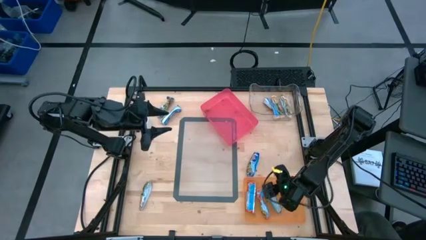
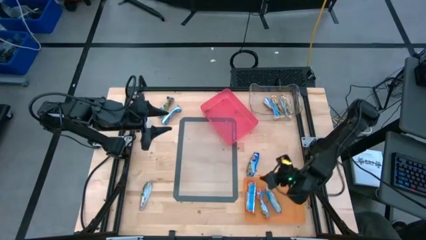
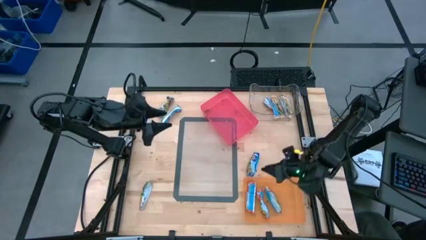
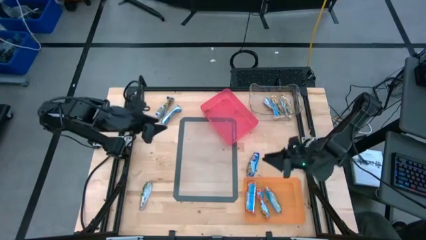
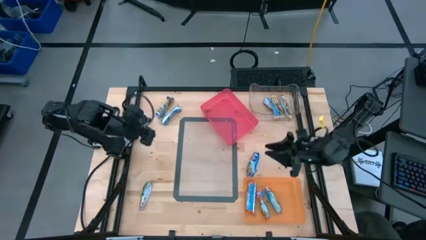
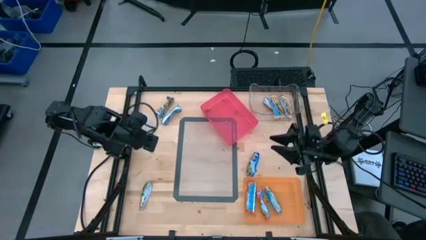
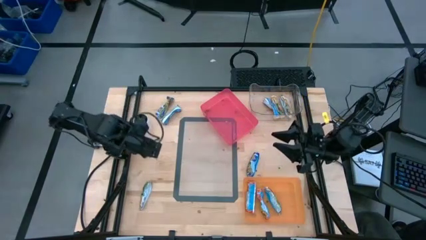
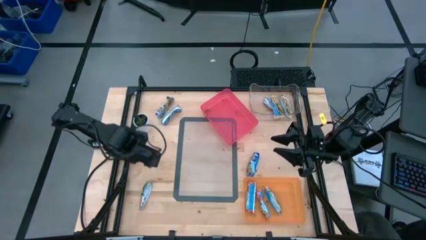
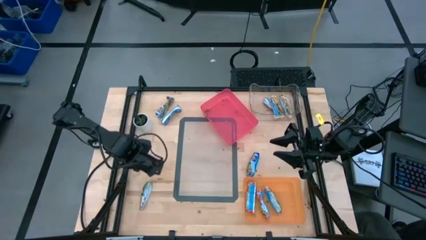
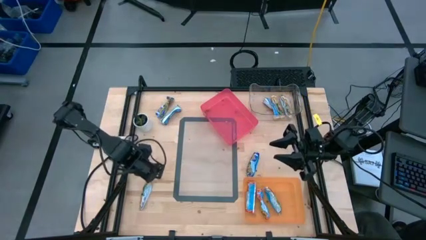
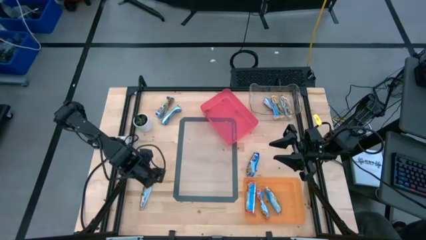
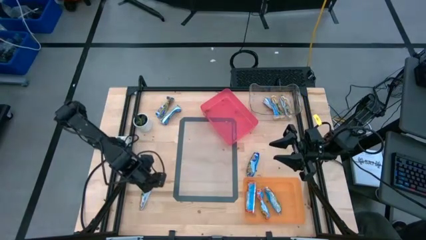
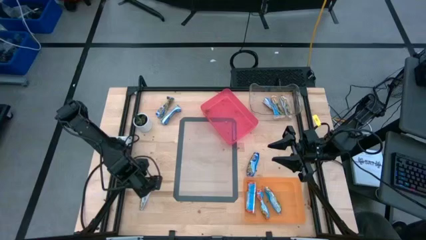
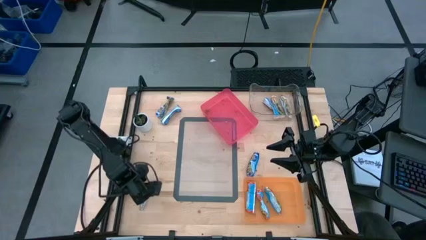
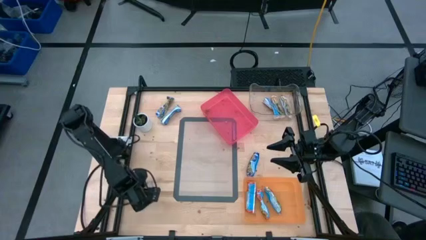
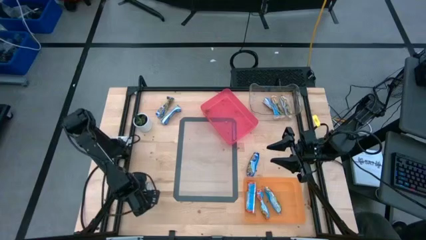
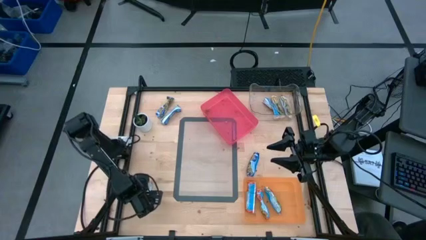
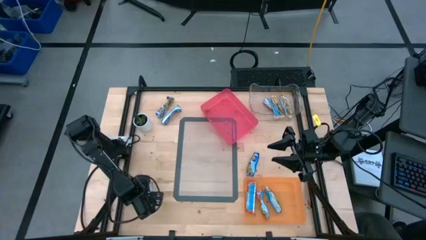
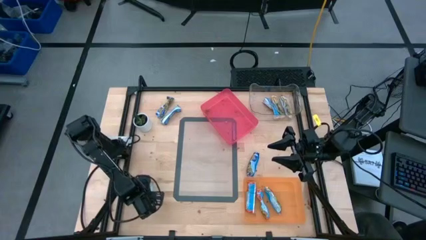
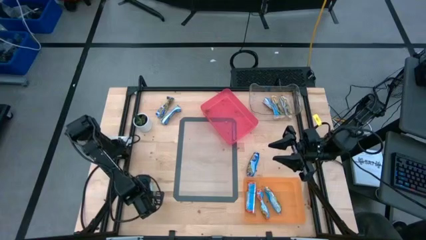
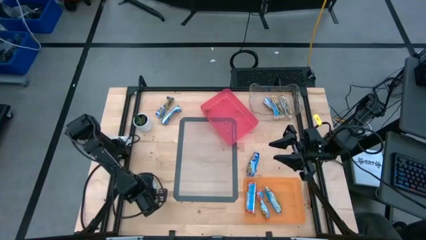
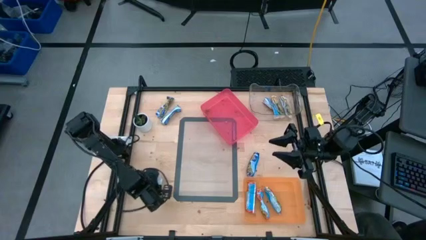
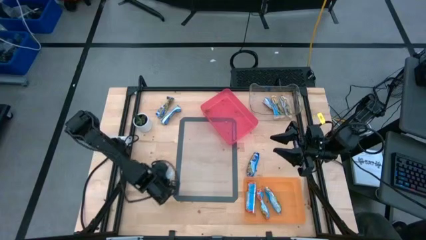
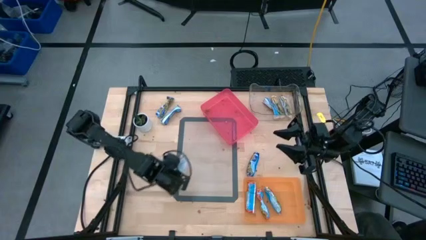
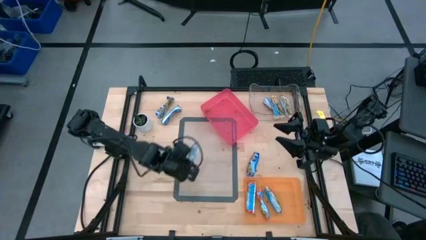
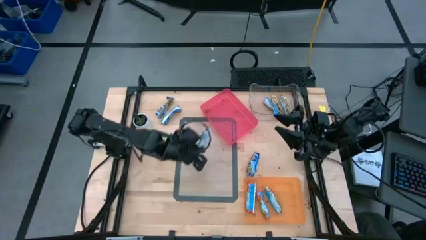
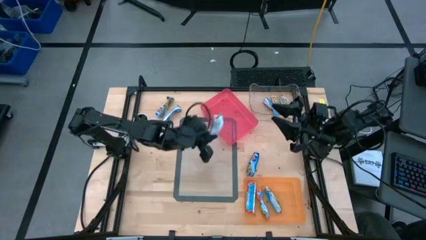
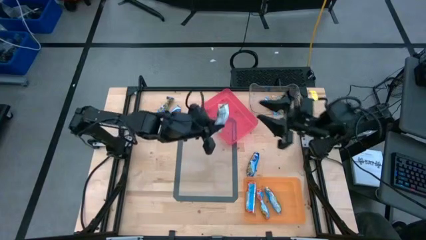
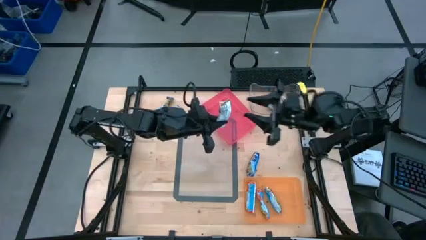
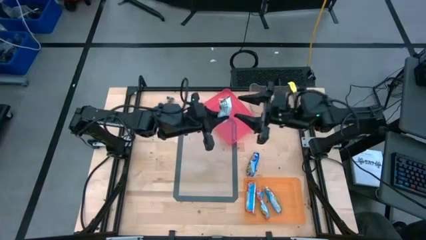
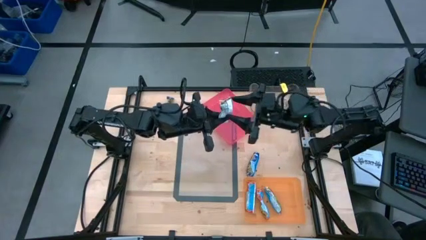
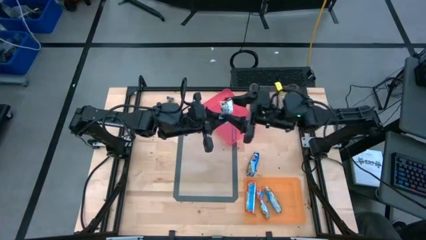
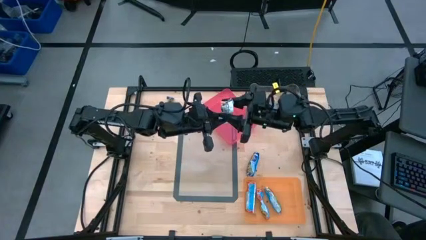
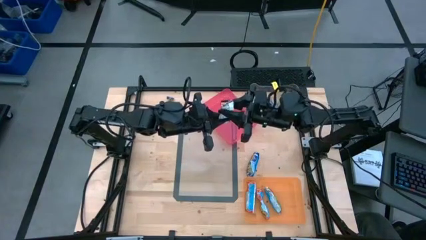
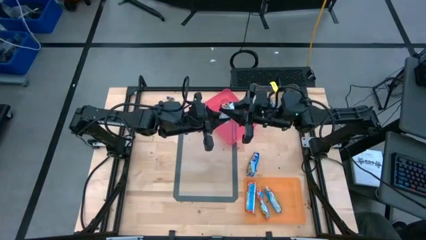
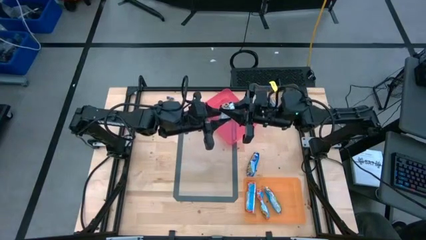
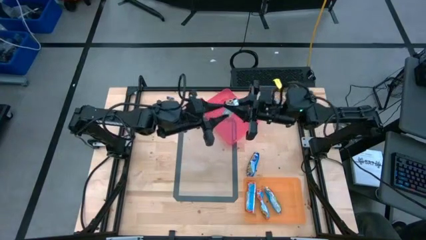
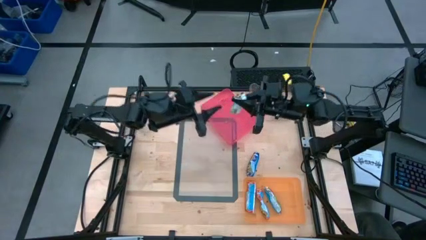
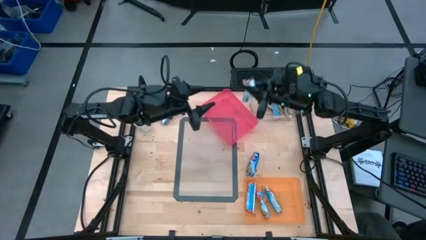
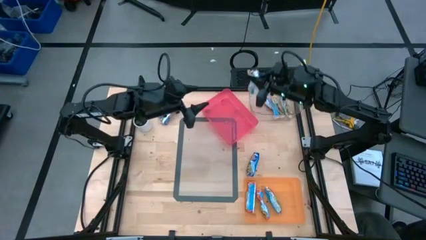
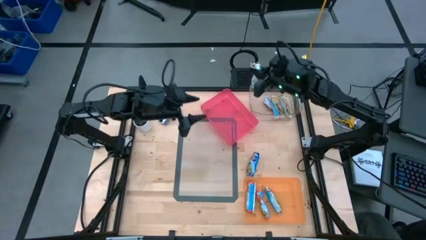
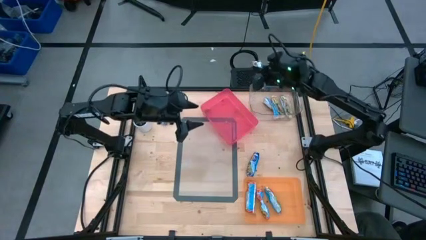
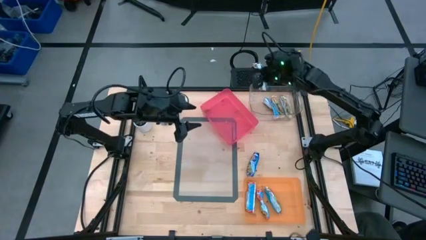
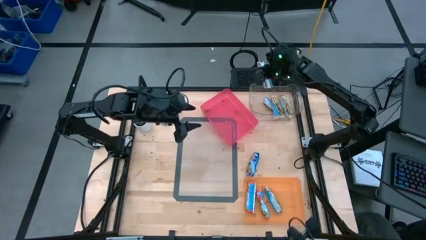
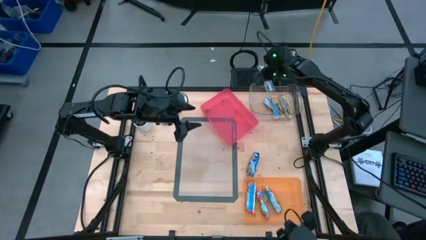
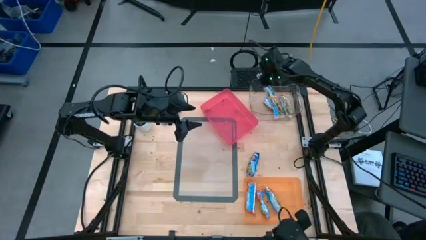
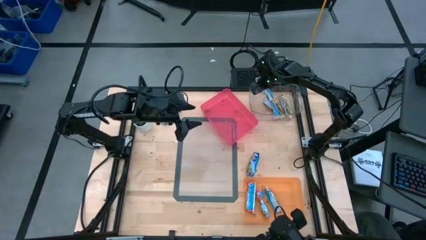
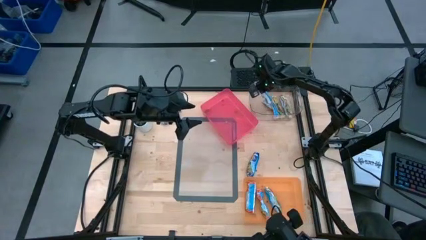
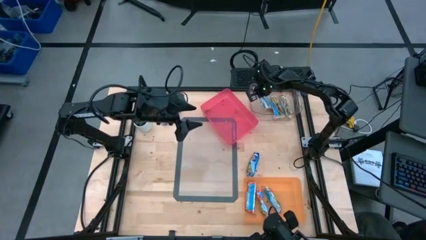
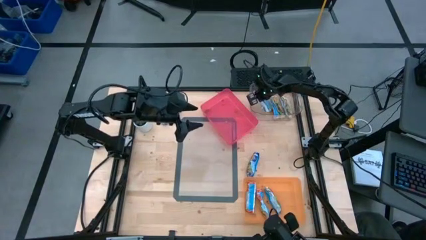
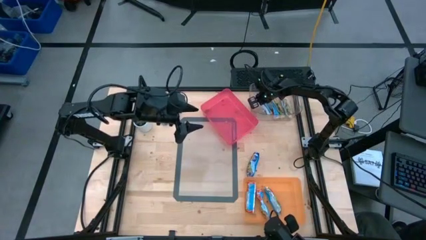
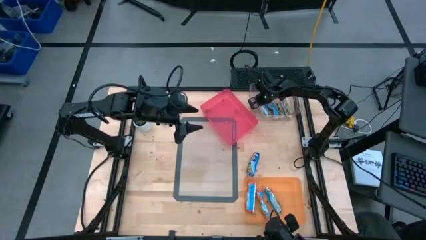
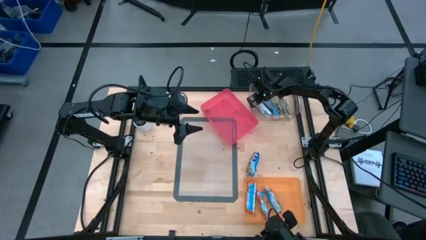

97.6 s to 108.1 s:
Task: Pick and place Granola Bars by type
Put the yellow granola bar into the transparent bin

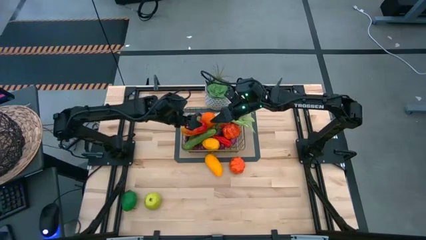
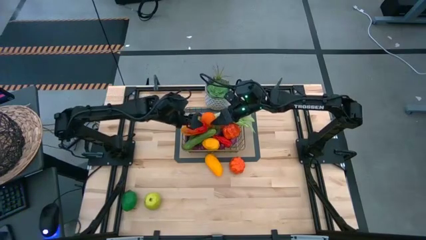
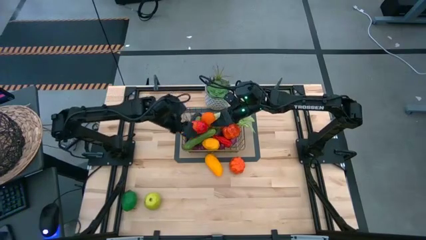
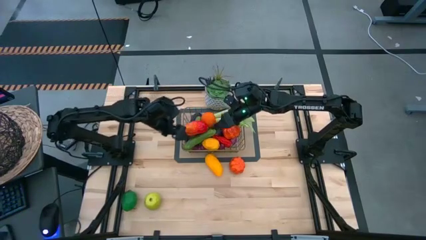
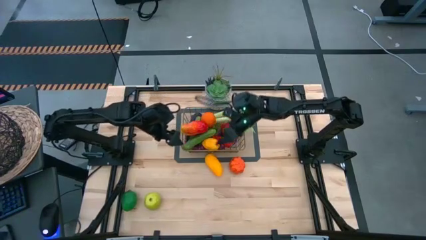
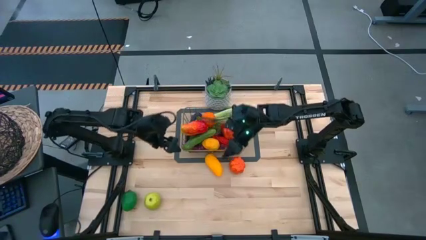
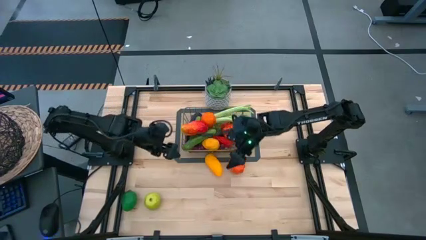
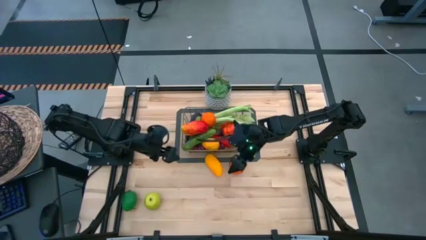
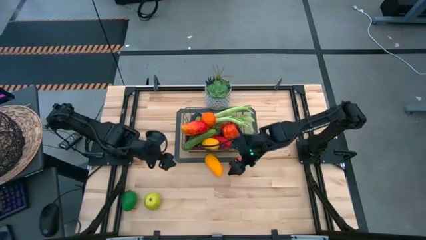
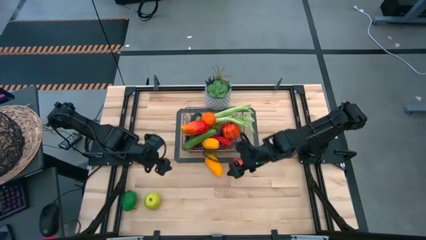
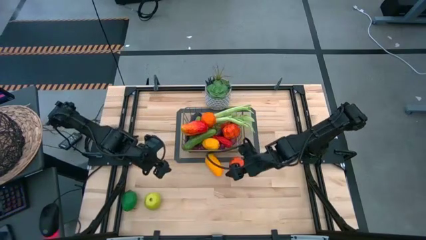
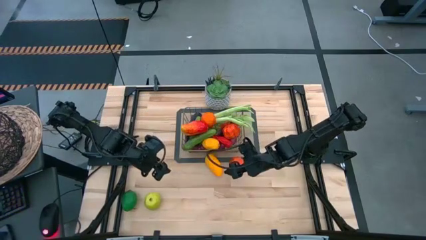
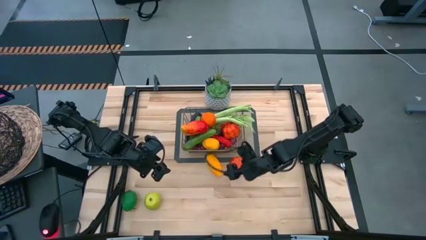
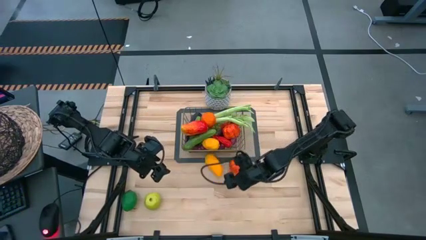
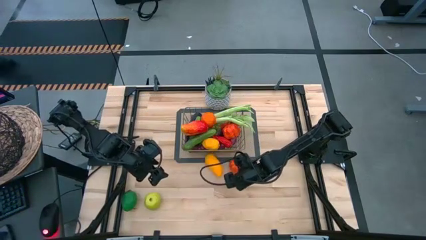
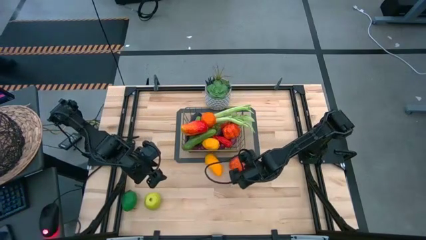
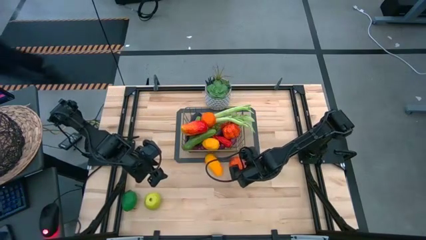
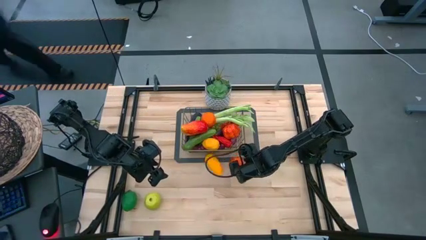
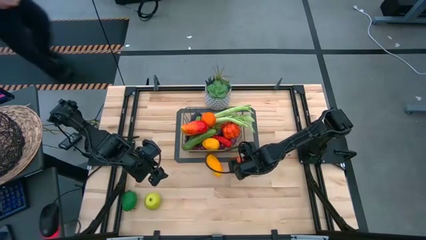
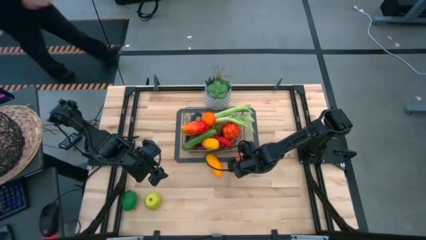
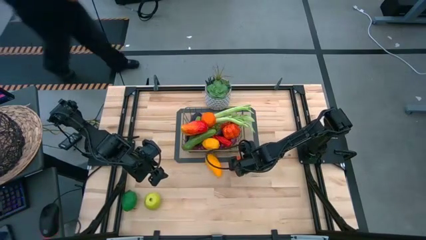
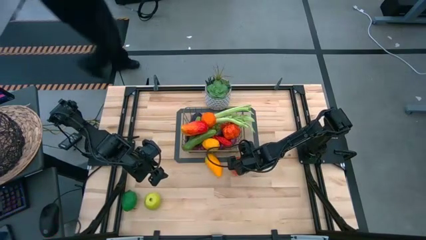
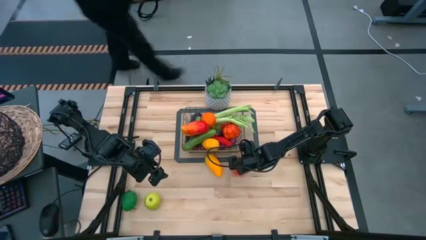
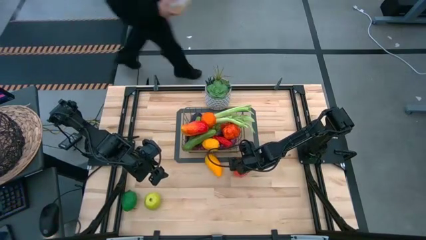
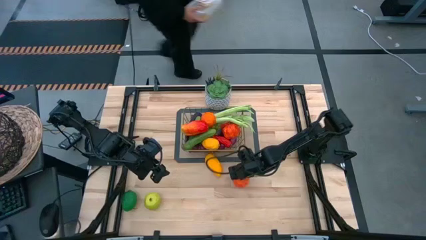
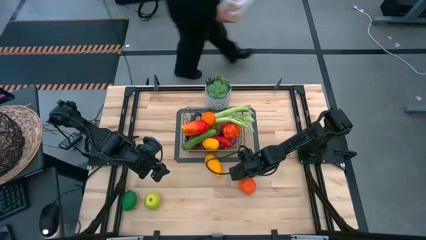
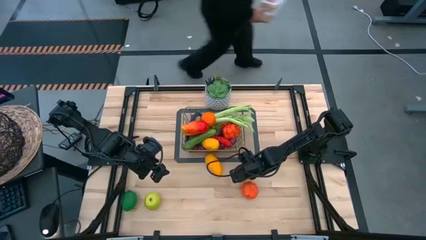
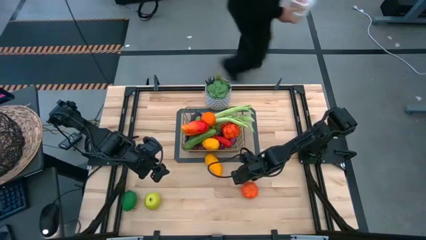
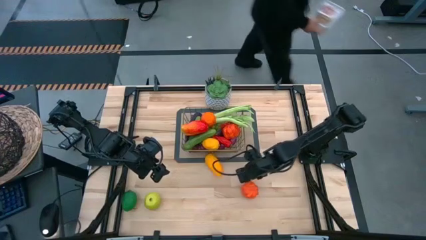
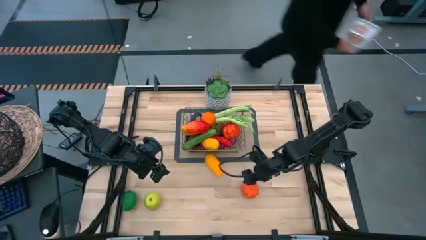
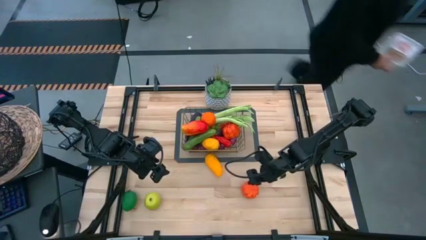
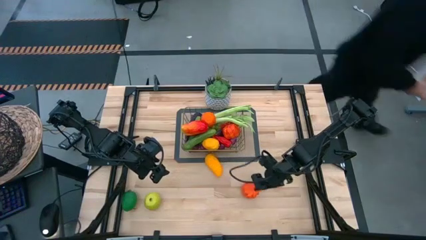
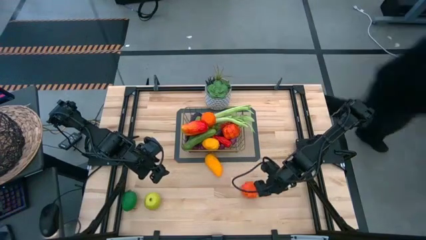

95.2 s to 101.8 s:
Task: Build produce basket
Put the pumpkin into the wire basket
